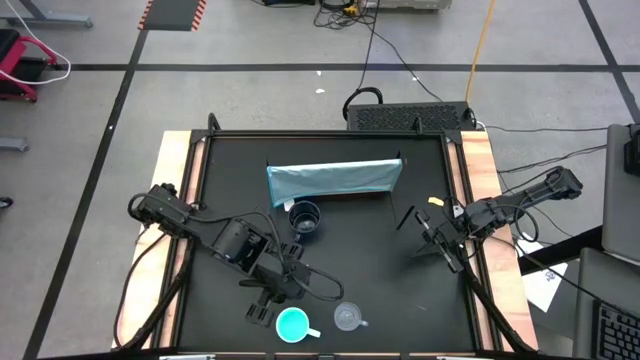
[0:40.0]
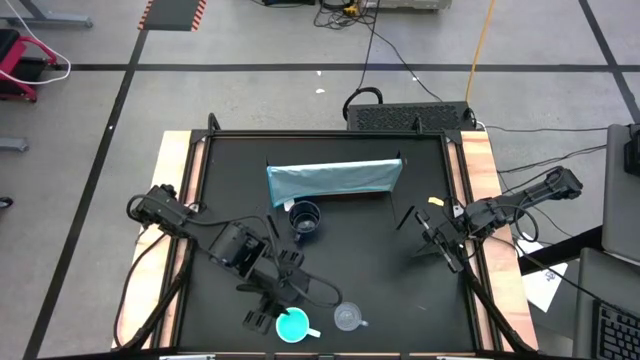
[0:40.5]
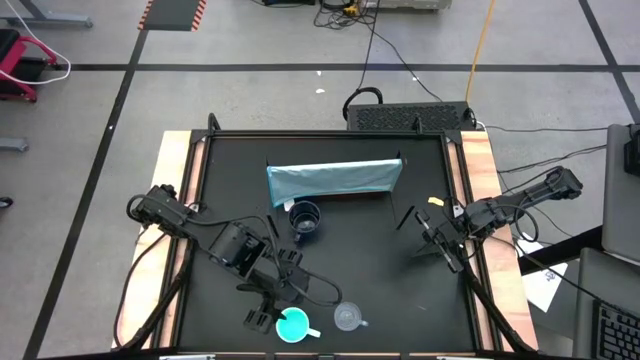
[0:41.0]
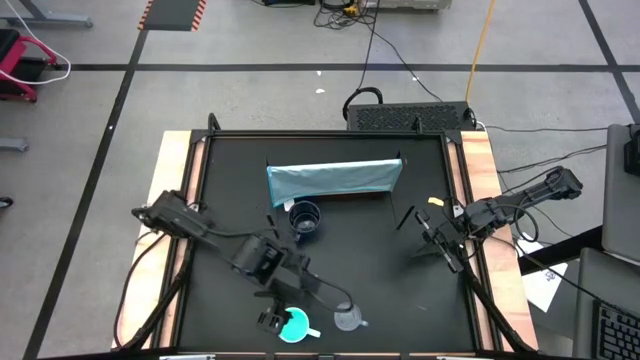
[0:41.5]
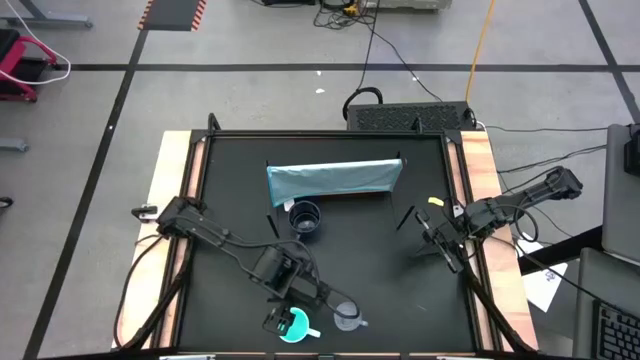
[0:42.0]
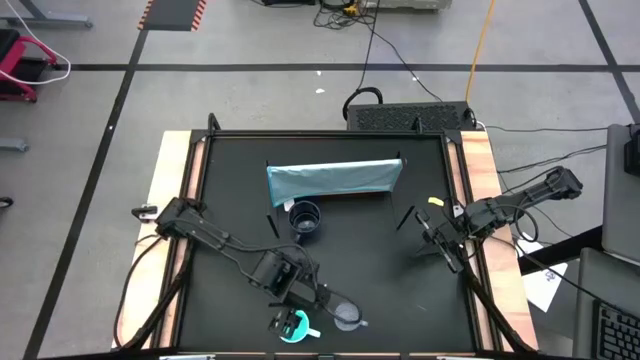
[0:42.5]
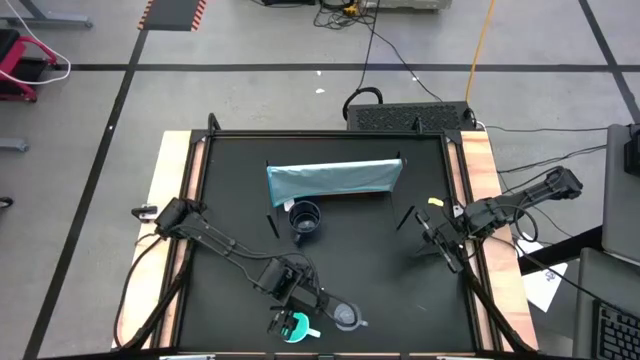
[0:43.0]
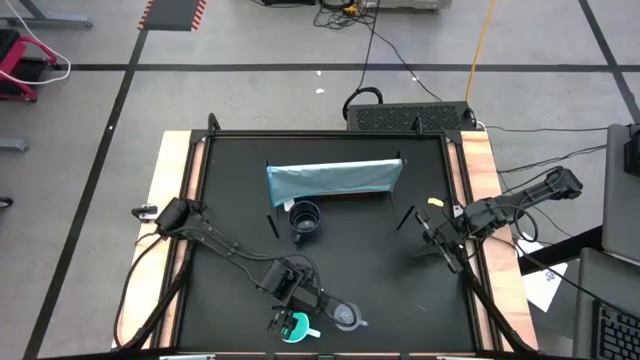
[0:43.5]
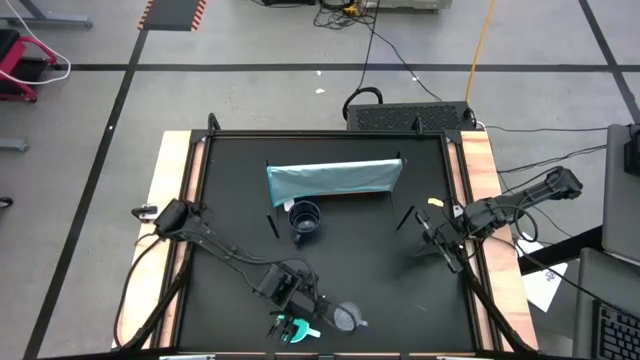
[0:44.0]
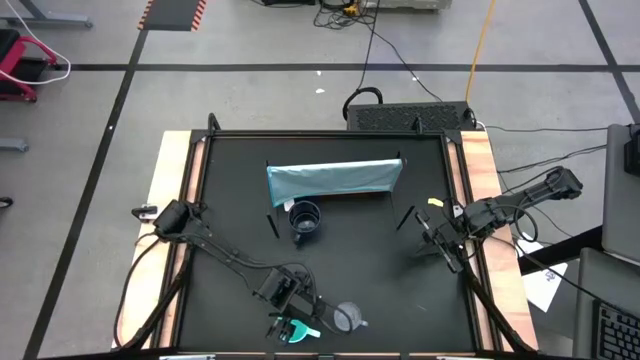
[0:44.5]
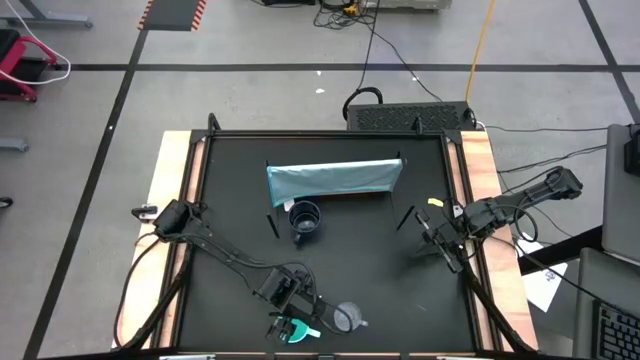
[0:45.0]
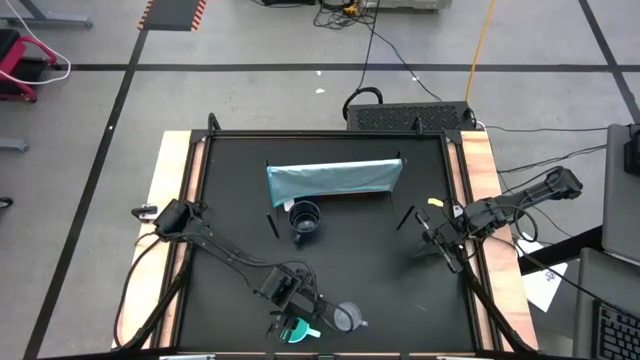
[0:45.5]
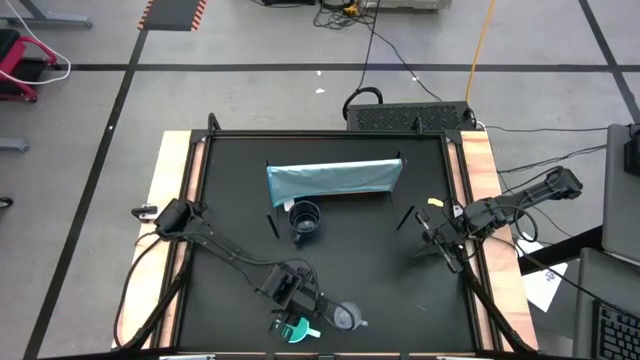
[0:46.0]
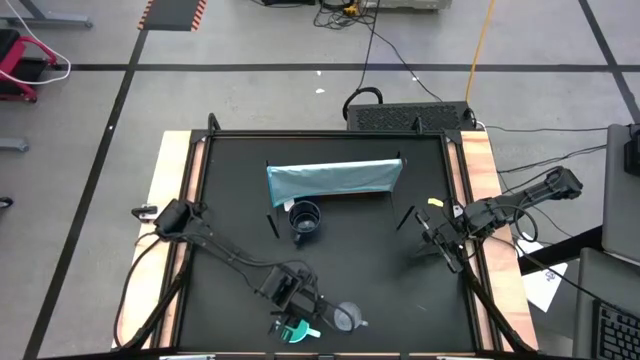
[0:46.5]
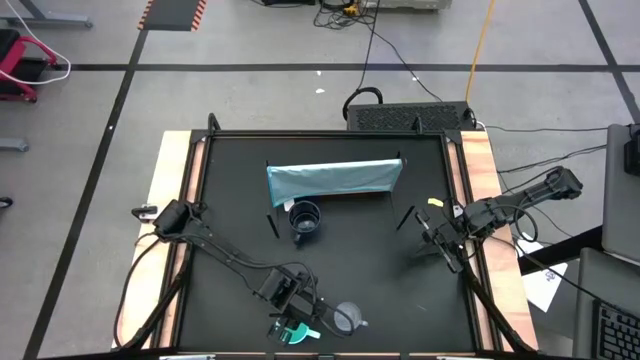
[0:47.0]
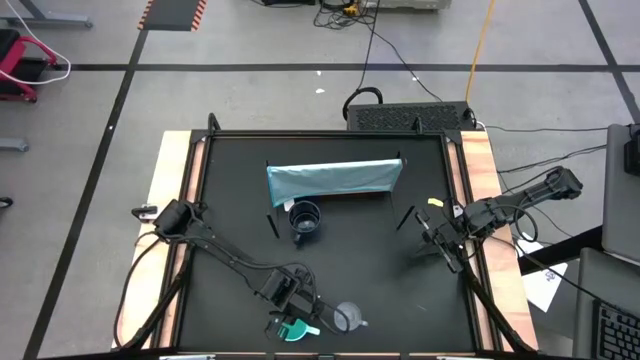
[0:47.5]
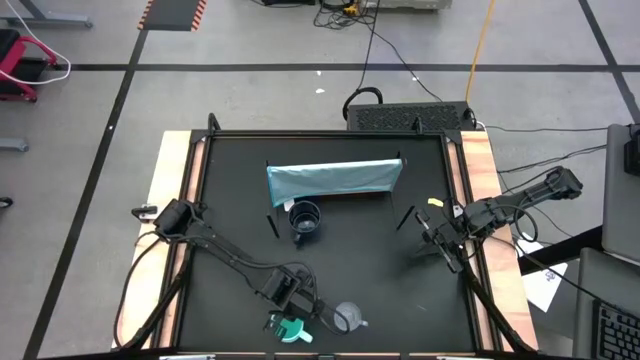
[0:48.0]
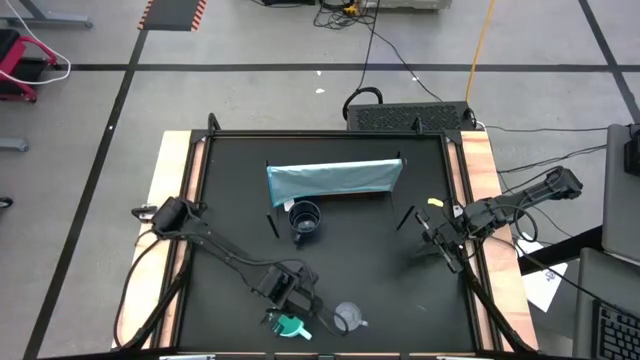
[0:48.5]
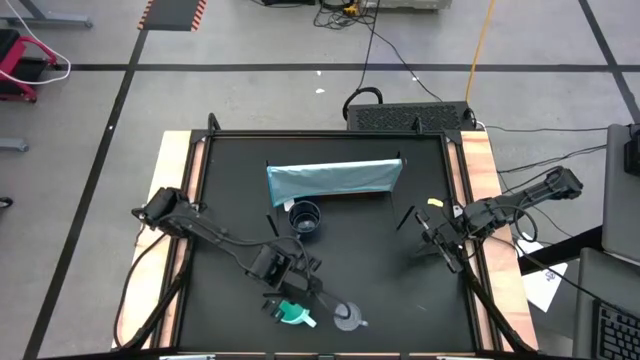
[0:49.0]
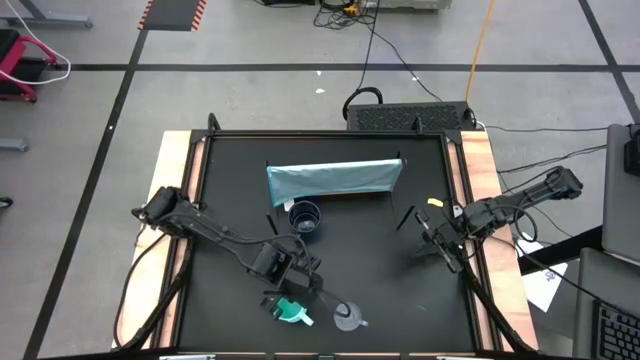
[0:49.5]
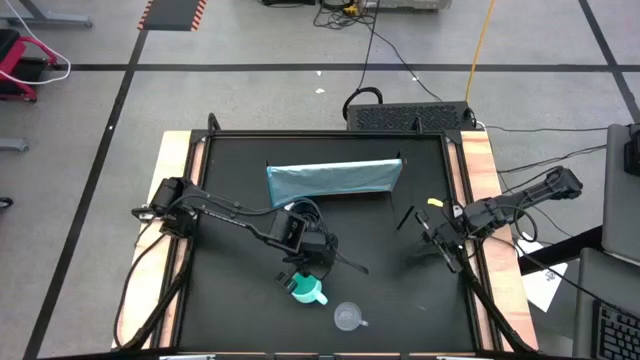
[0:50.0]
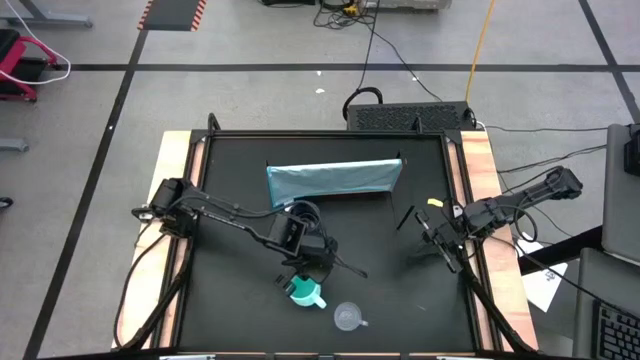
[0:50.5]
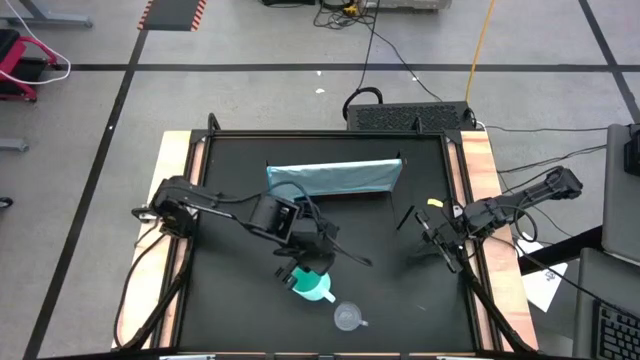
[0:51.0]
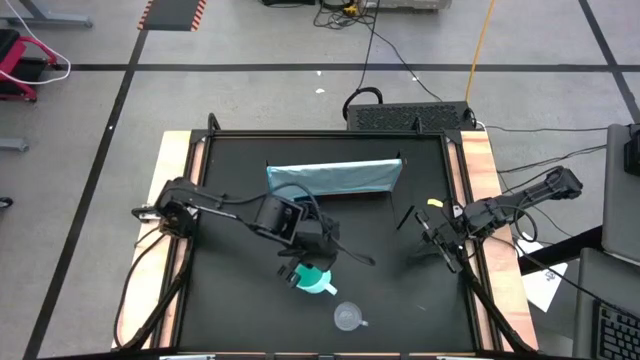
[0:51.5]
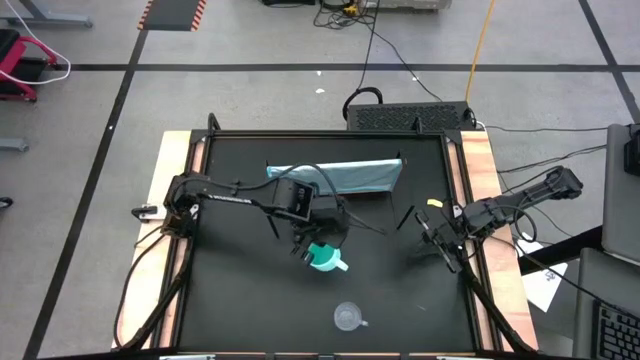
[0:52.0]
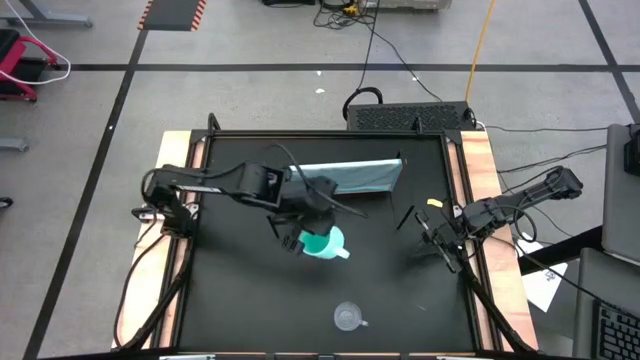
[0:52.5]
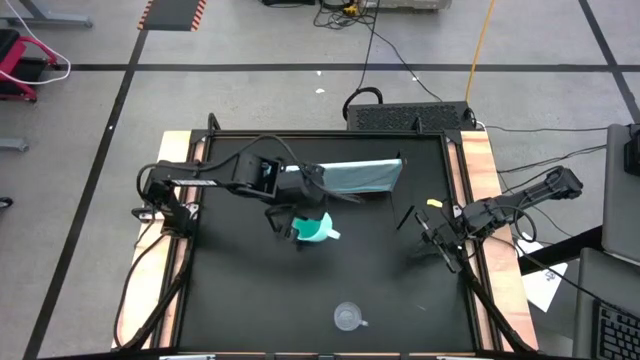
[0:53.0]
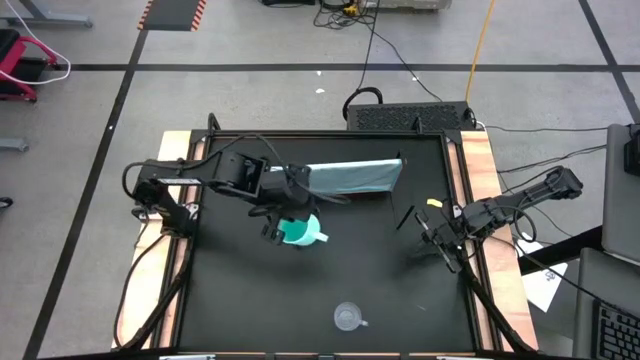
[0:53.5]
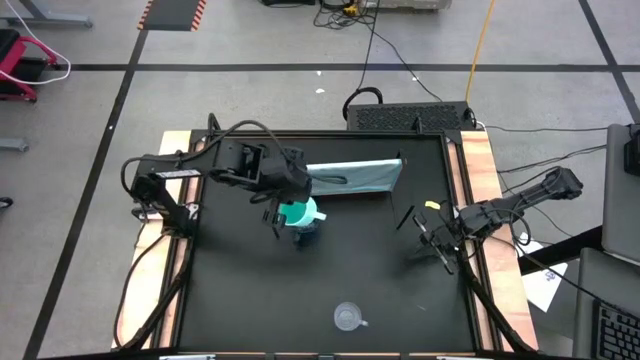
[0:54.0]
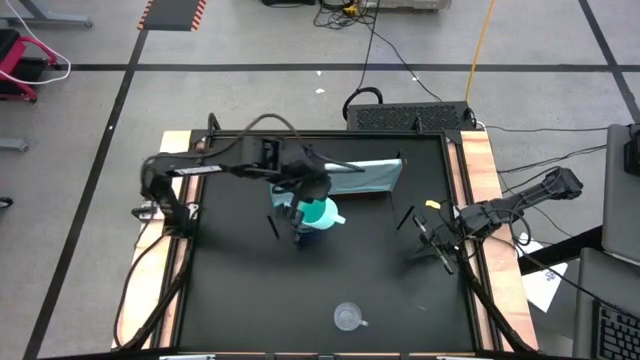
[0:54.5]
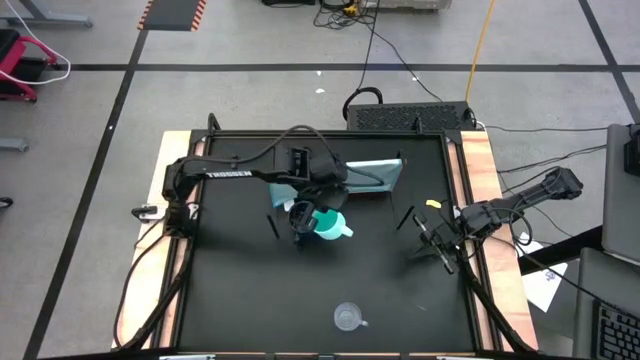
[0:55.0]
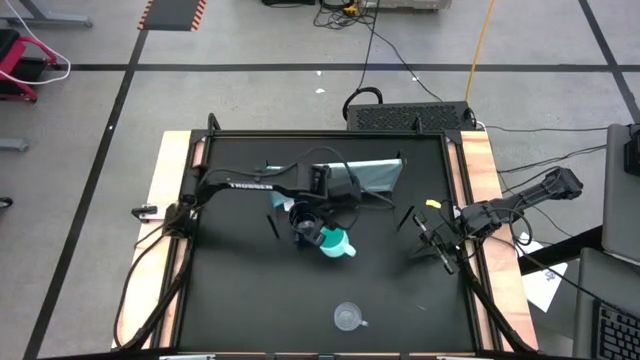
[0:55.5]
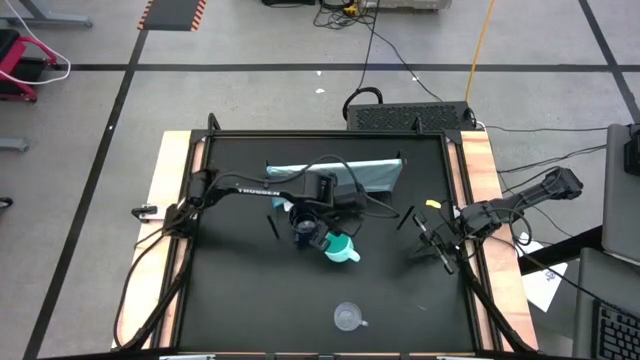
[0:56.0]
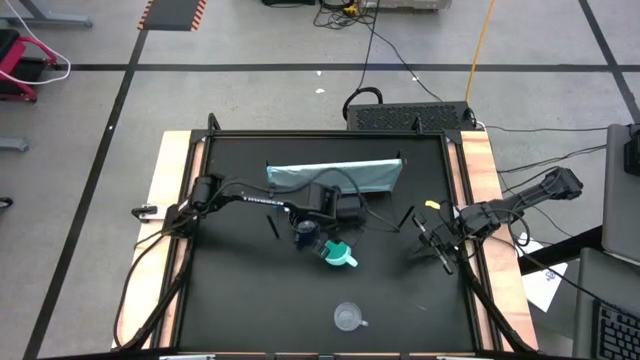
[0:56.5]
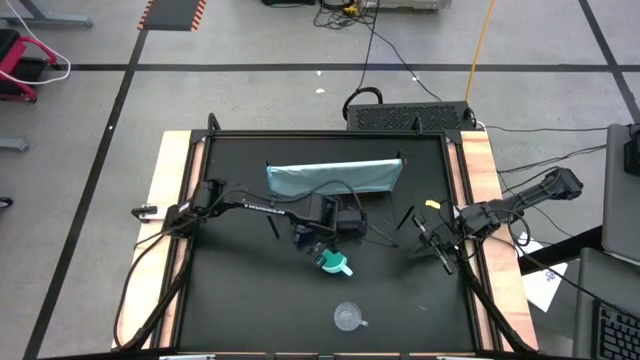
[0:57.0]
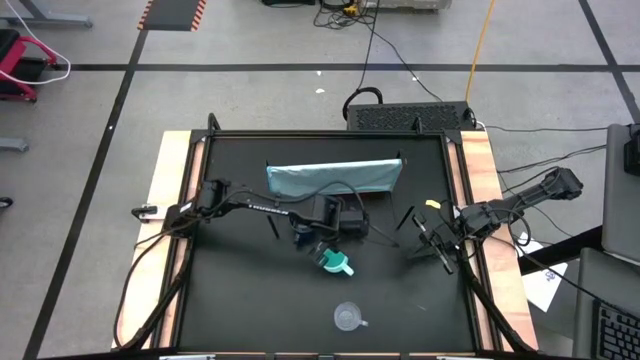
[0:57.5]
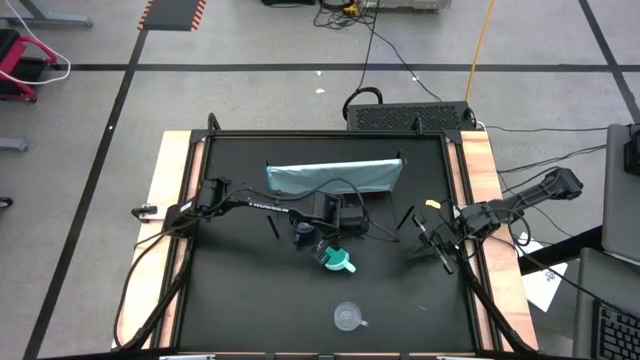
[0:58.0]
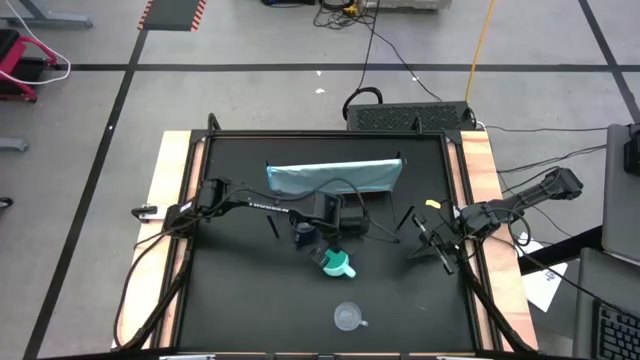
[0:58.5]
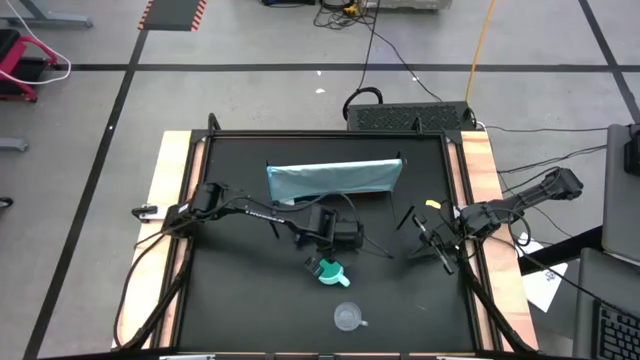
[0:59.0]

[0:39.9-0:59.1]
Task: Stack small to large cups/mugs on shelf
Move the light blue mug to the center of the table
